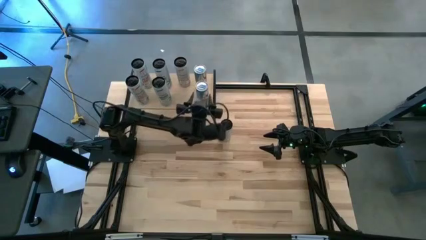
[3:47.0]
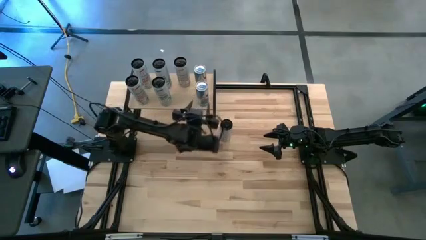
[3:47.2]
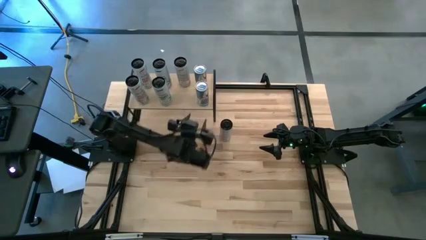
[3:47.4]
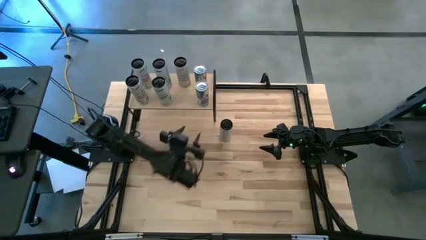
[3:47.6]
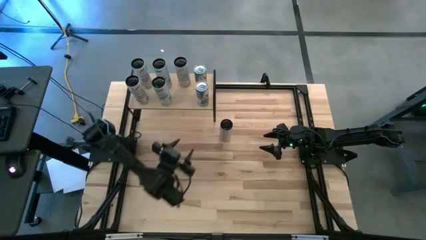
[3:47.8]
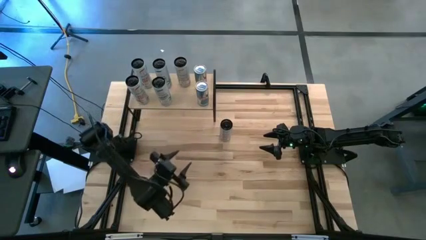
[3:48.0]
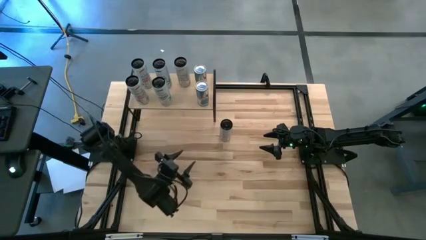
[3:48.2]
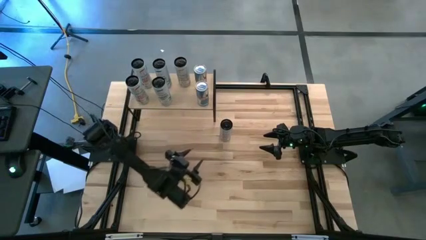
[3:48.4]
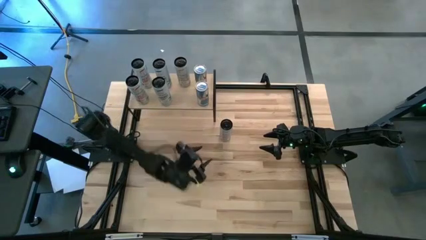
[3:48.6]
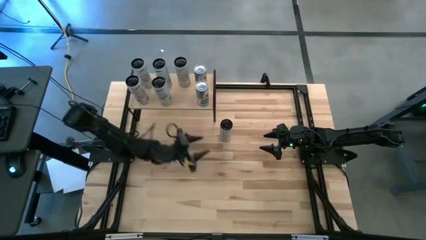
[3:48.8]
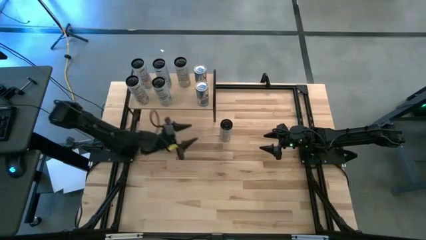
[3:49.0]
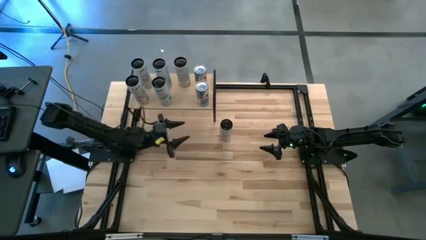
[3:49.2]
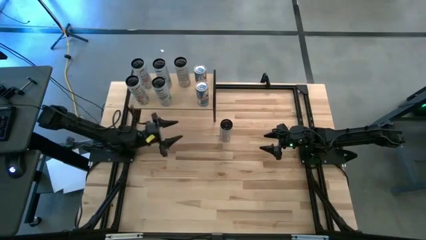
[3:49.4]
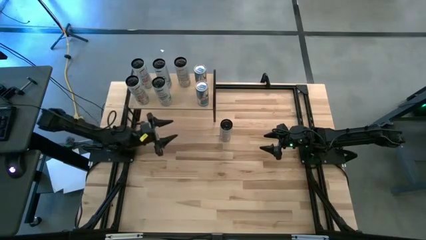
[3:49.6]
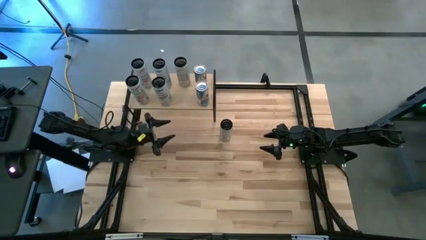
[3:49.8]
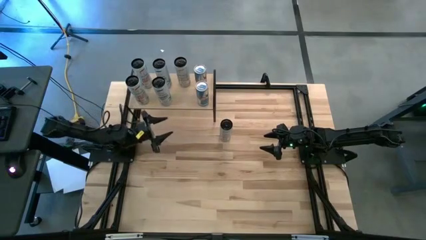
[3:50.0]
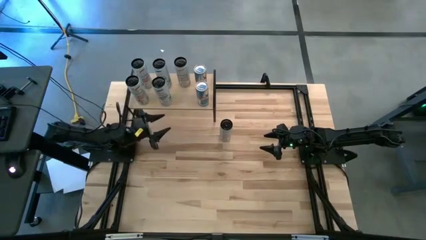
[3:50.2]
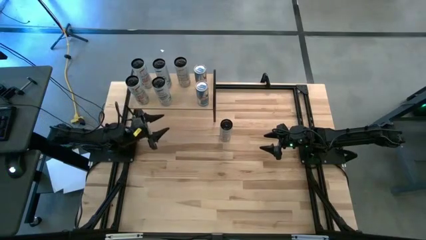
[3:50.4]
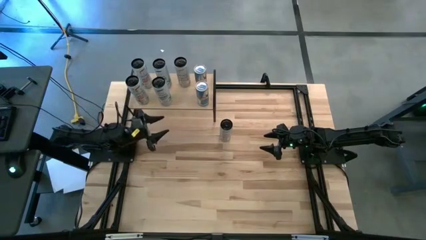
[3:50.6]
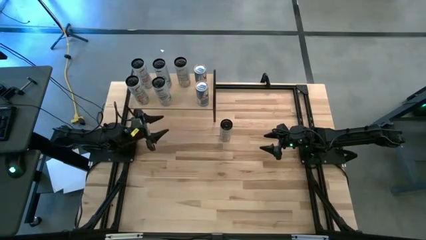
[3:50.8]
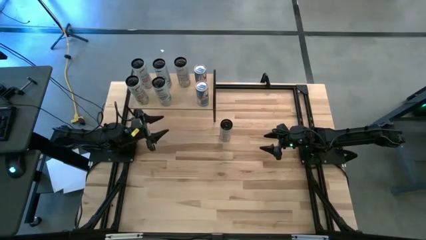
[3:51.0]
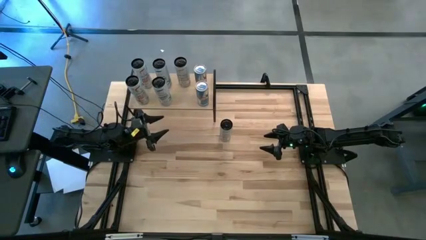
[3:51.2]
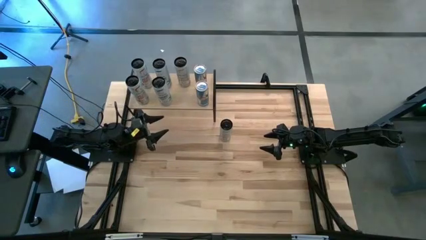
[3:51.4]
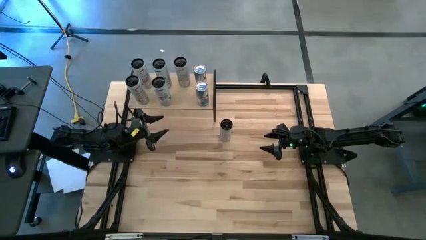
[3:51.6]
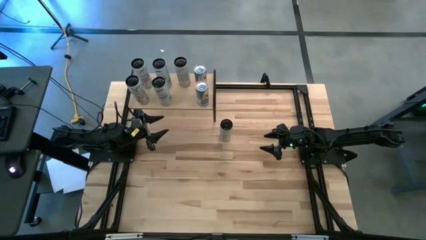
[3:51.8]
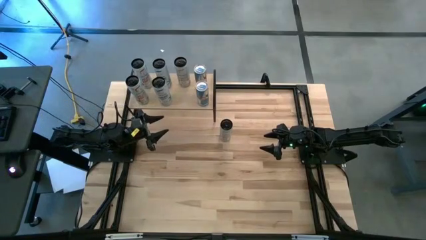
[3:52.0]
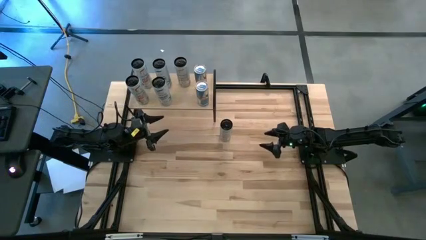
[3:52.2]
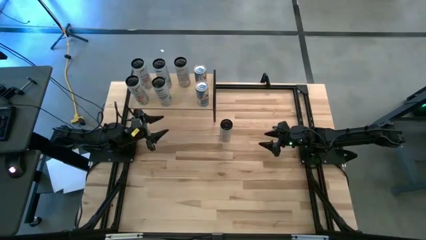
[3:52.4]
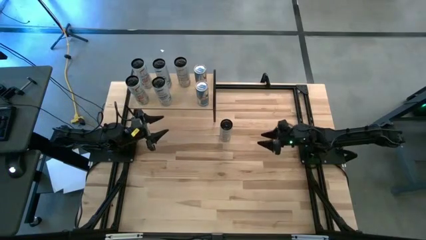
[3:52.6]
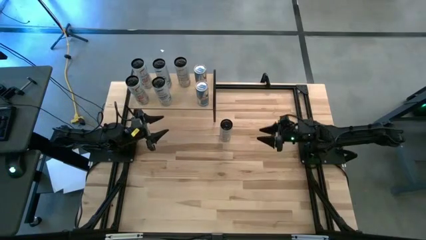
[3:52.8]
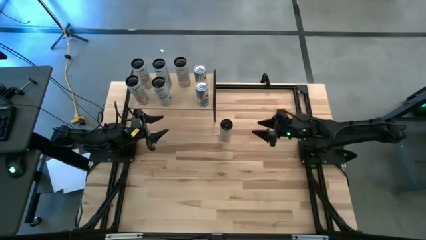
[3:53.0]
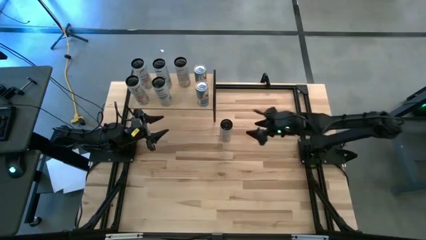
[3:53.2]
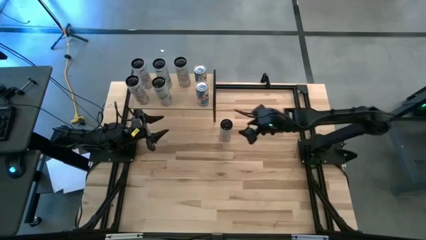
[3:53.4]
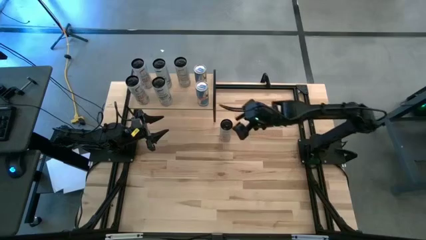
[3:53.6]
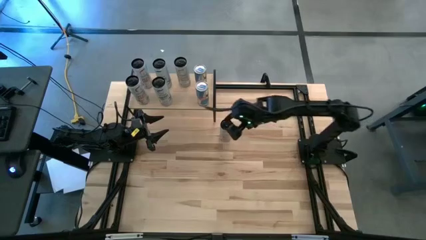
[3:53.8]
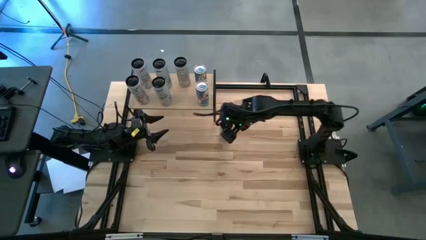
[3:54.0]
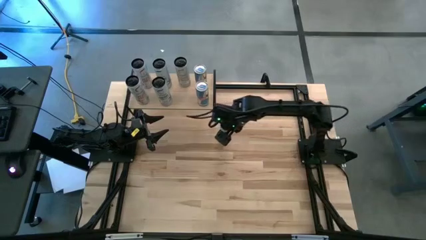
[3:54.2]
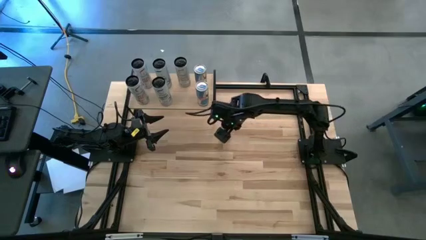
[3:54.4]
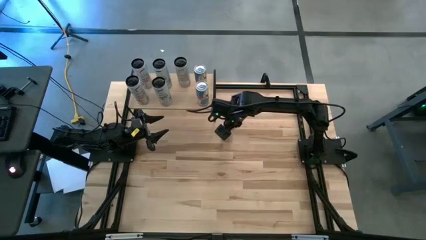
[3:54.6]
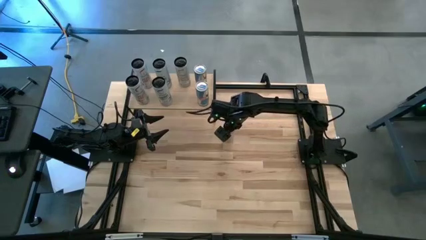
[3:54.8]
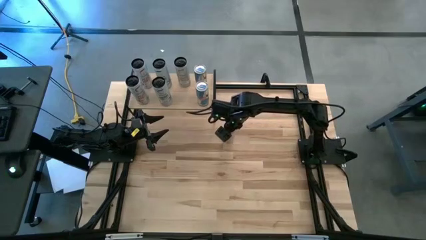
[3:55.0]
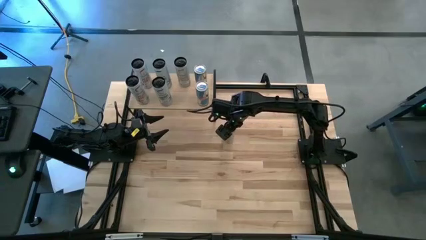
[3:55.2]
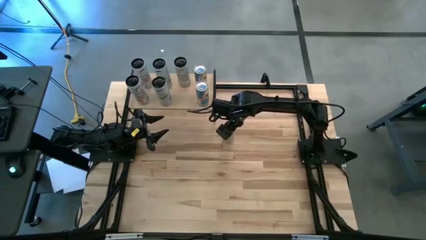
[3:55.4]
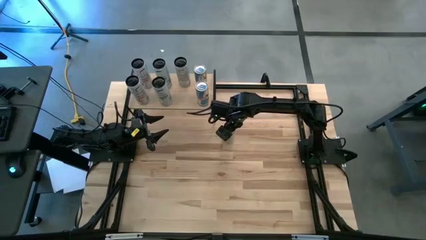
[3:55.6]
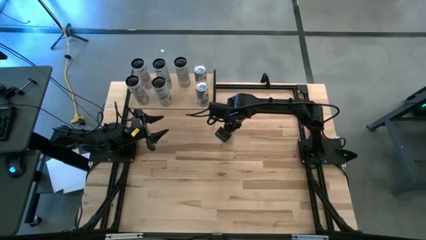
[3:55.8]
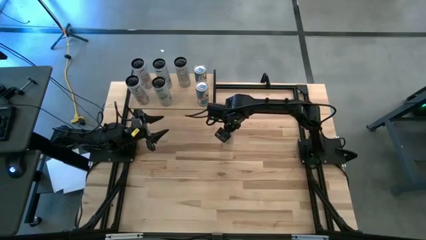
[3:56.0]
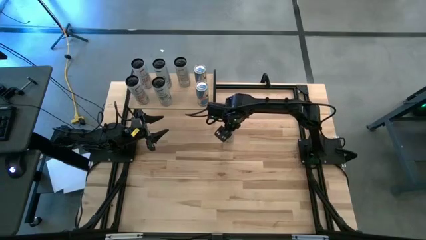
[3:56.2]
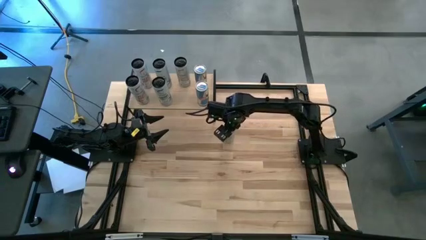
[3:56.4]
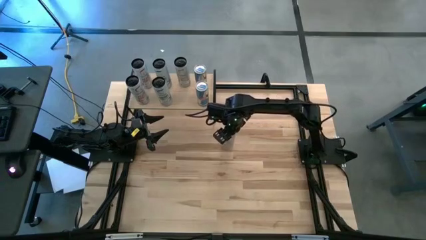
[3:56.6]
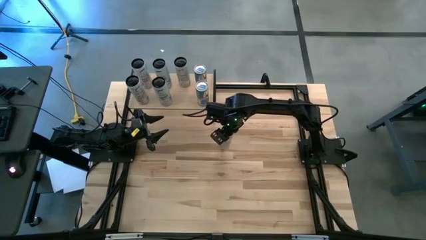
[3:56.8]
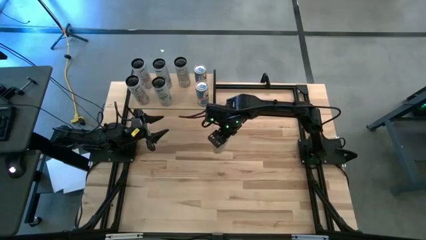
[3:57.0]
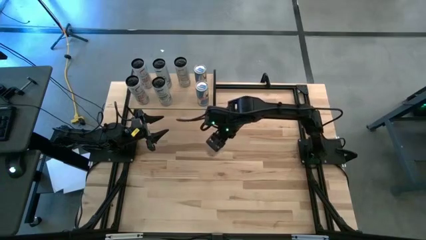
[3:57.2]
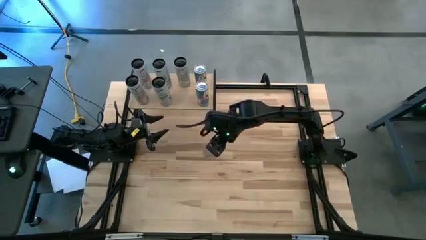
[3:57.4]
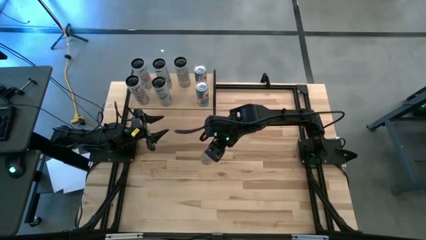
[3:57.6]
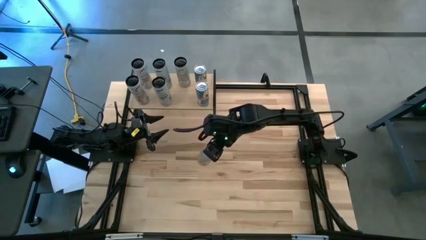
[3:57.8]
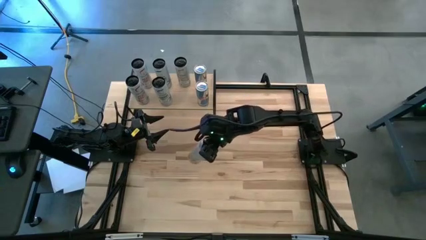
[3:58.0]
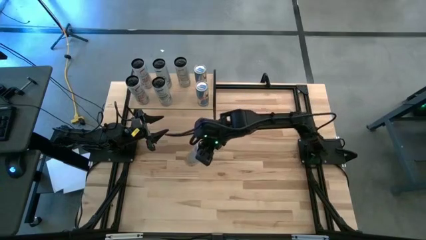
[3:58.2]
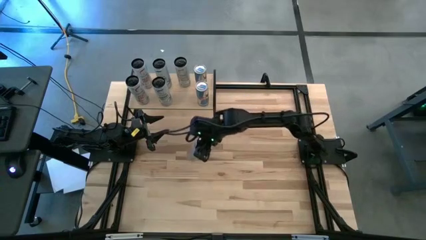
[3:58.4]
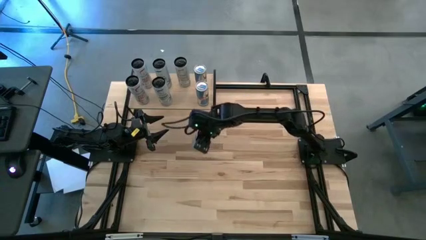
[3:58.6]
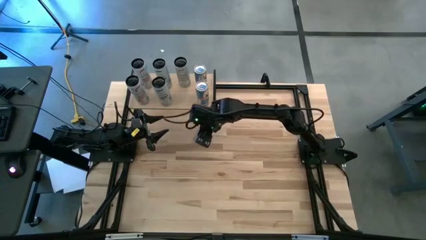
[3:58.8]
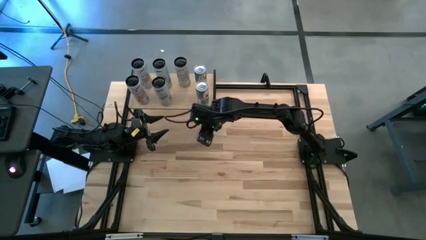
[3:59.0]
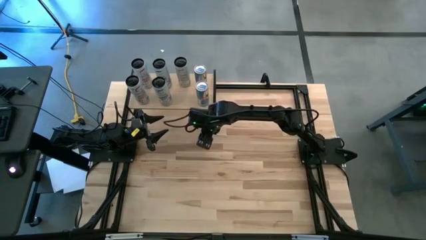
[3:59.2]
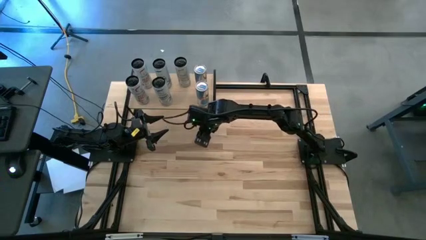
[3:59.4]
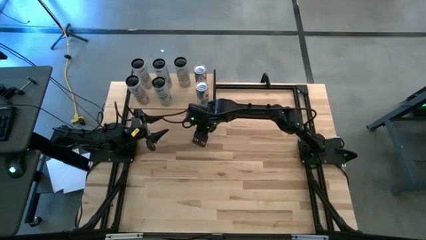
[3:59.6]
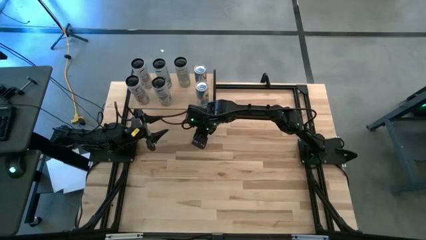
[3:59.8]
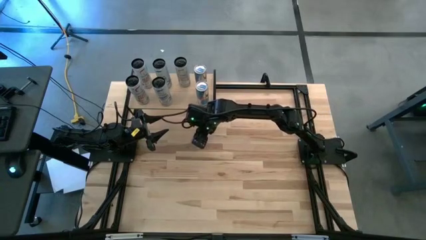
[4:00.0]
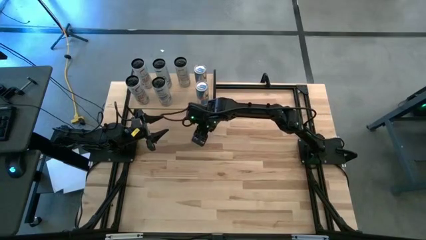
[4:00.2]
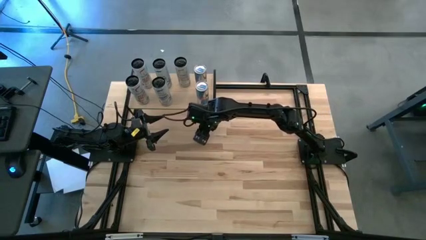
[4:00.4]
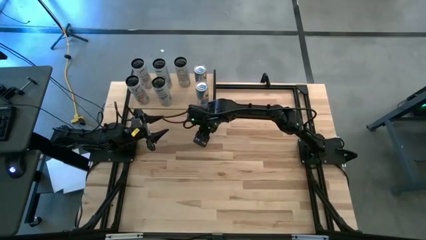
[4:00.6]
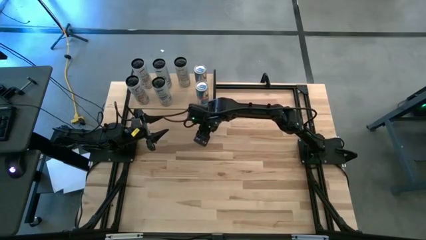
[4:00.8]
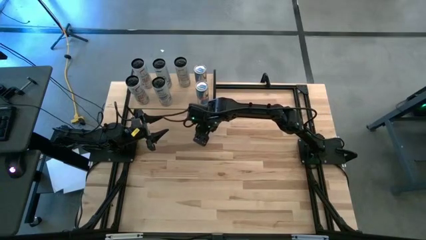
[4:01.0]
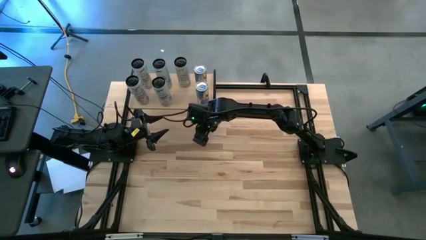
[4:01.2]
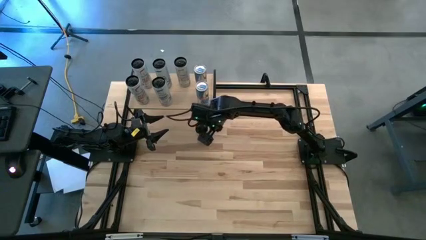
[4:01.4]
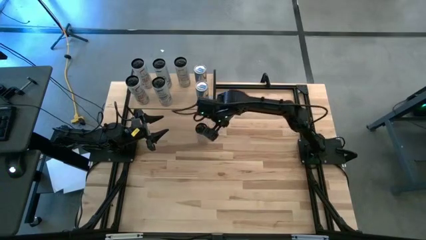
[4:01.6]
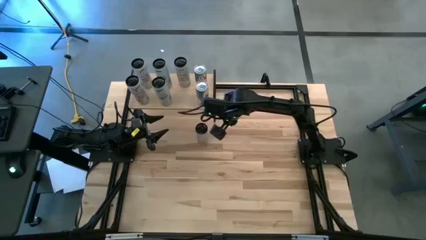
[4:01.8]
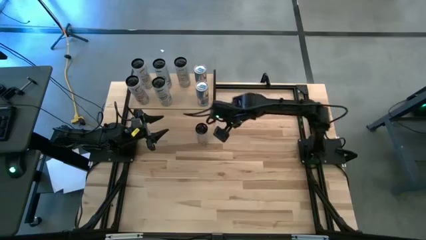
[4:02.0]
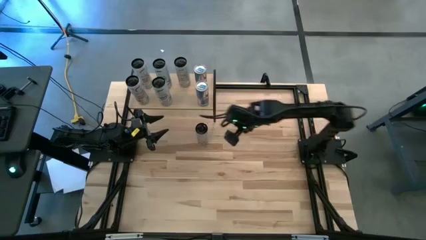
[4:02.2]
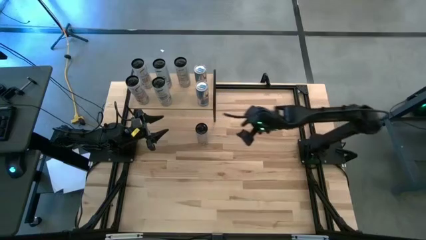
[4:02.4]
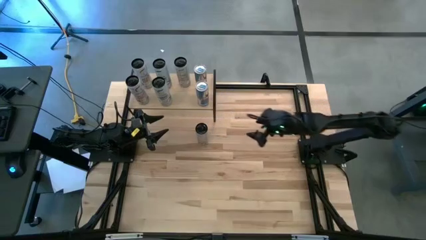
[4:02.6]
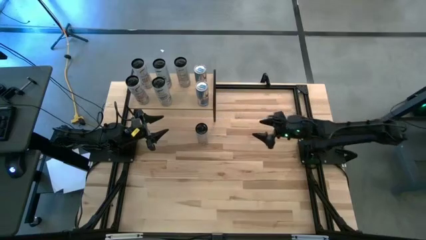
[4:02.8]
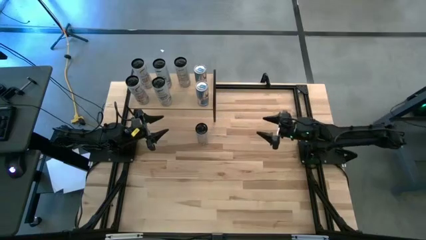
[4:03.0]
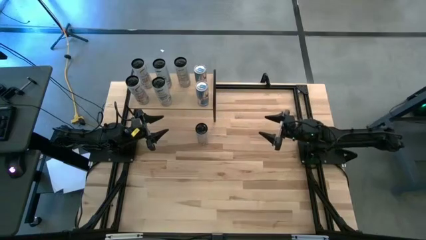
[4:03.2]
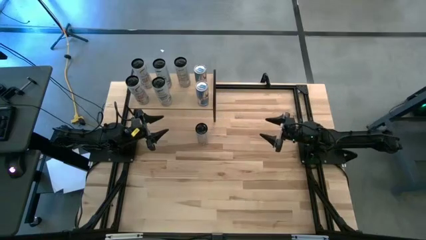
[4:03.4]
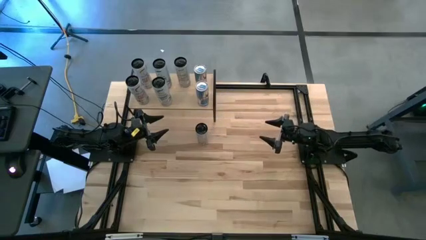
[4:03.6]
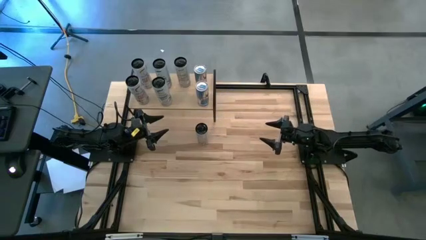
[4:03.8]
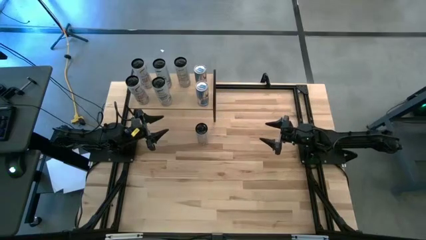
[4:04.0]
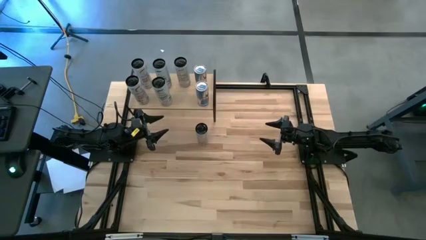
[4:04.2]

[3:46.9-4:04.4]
Task: Place canned beverage on shelf
Put the white yellow soda can on the shelf aligned with the other white yellow soda can
